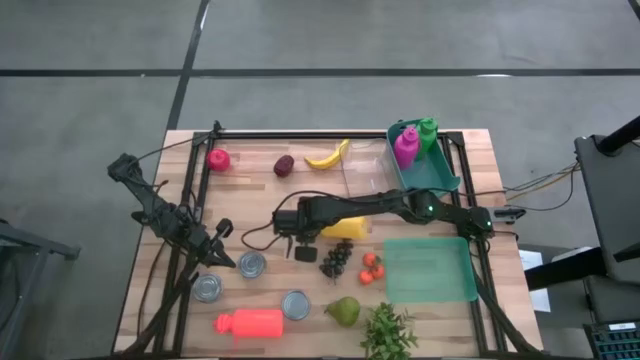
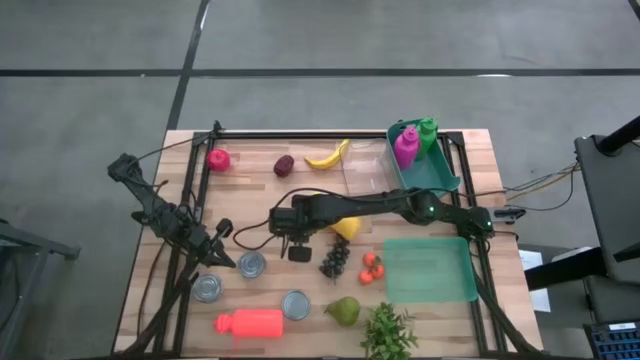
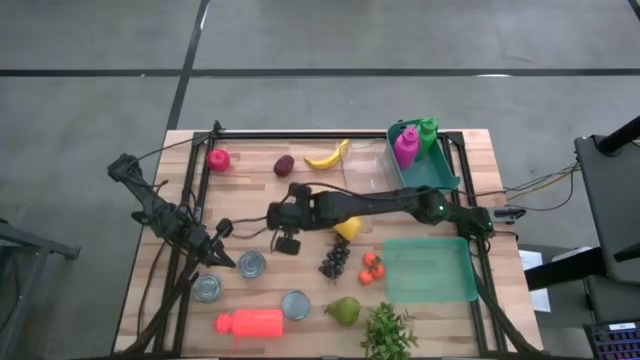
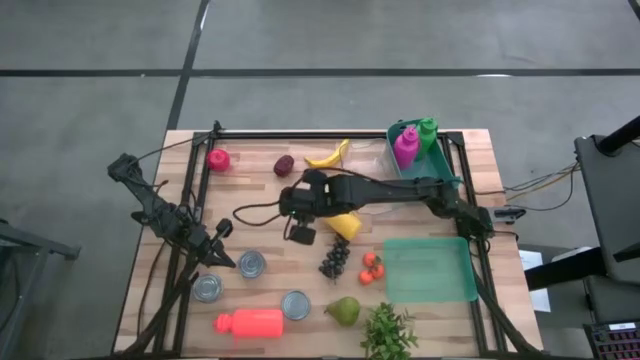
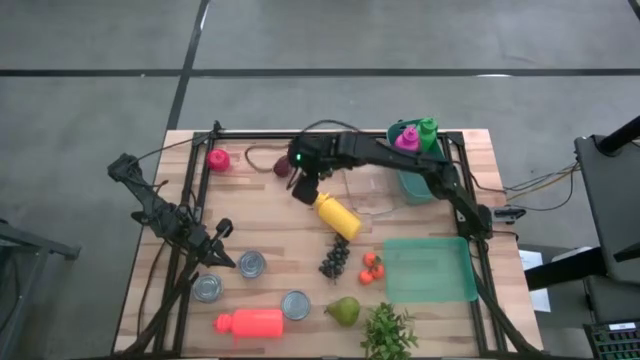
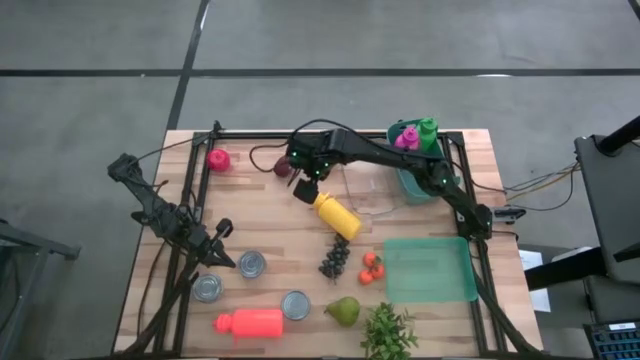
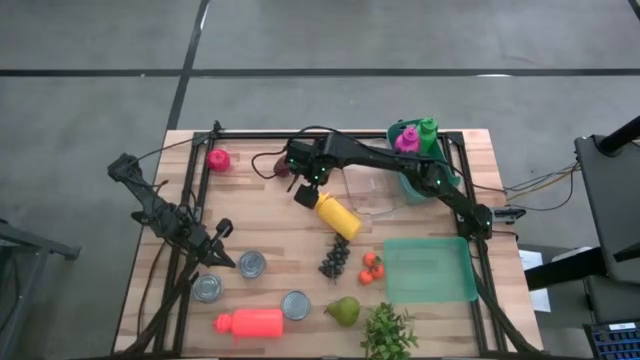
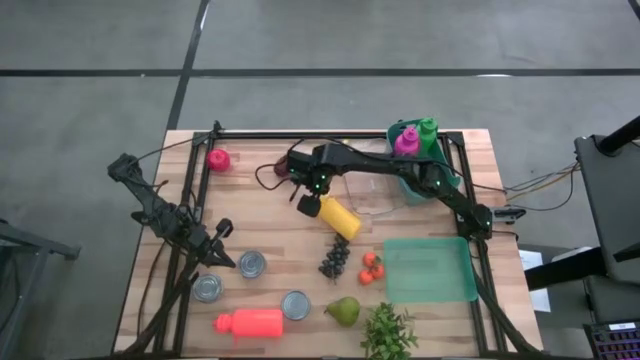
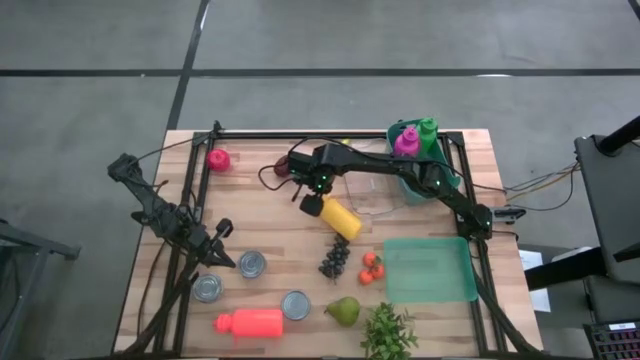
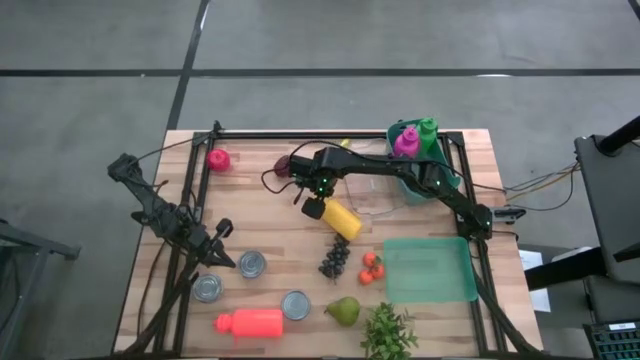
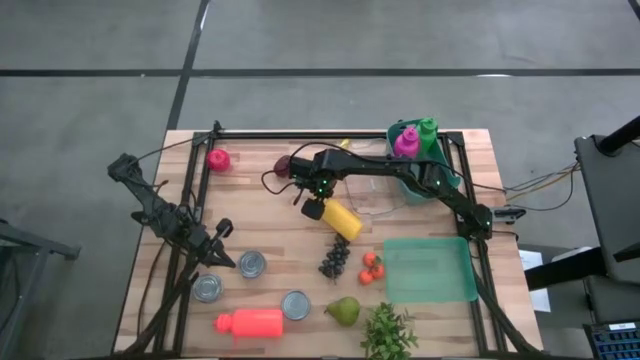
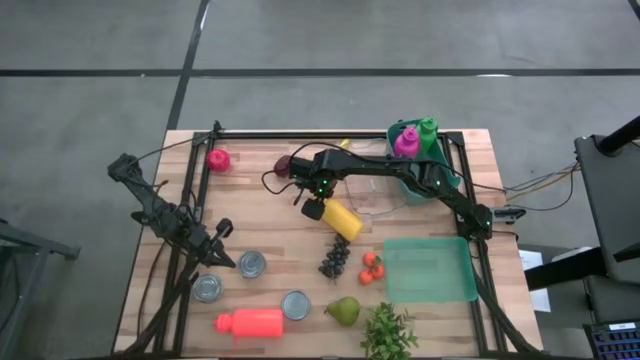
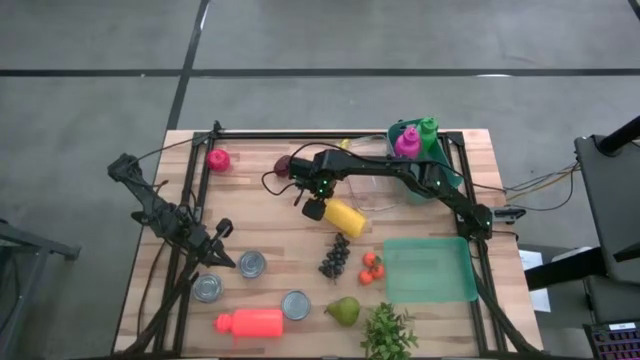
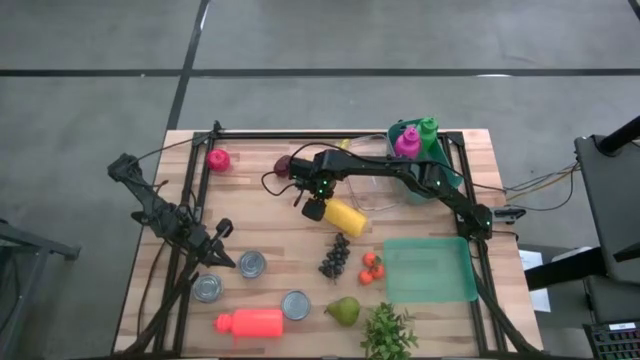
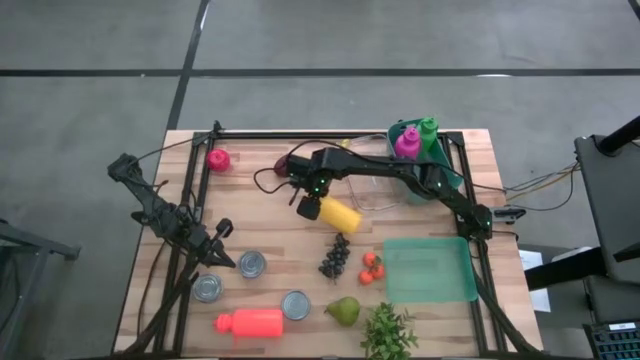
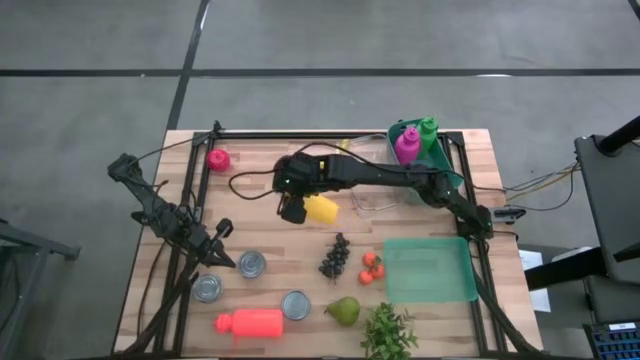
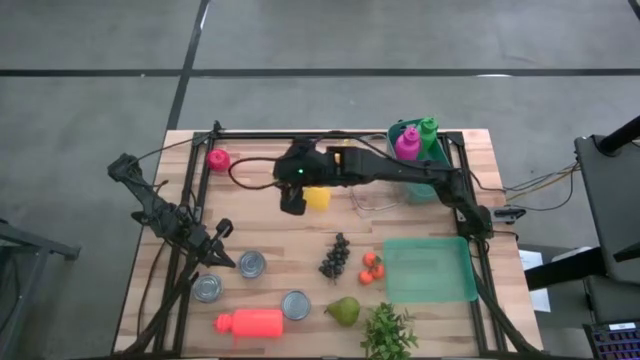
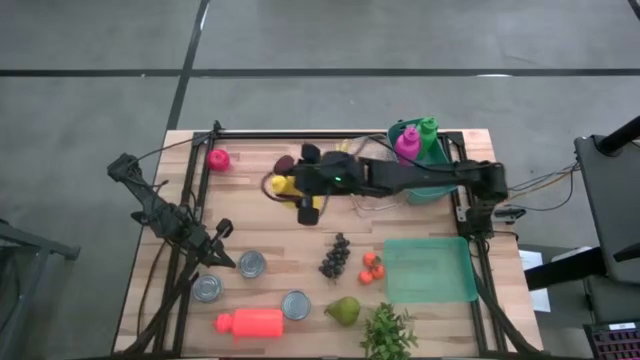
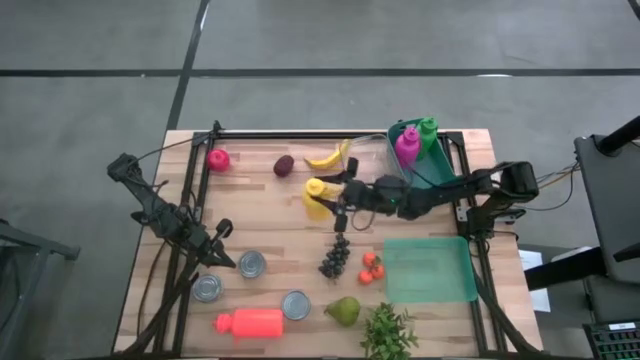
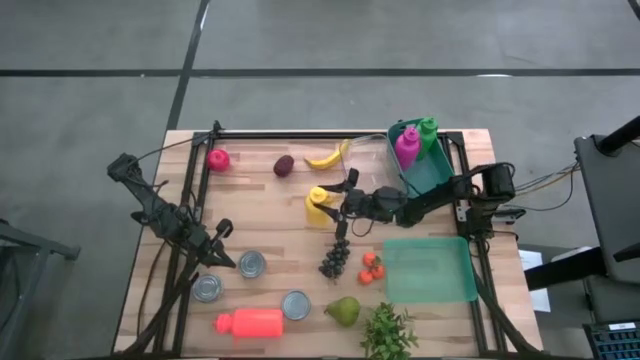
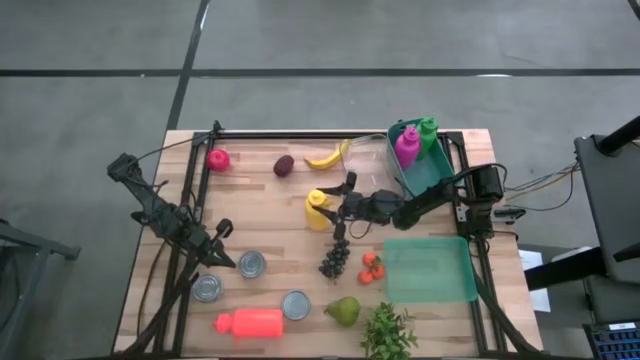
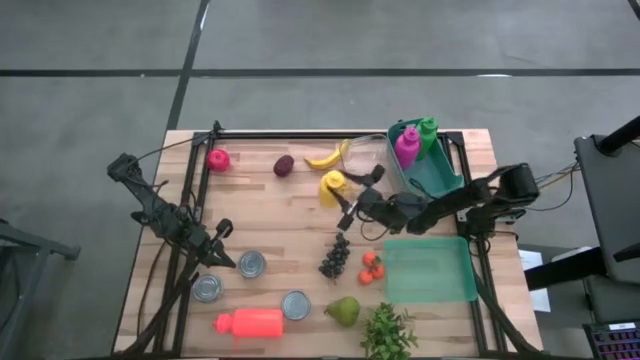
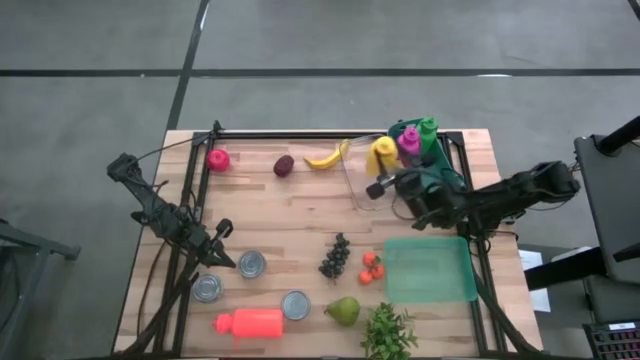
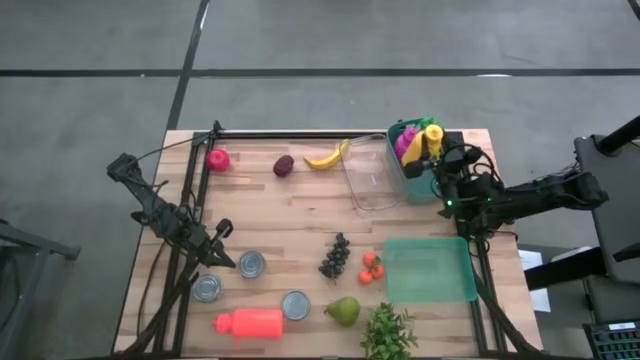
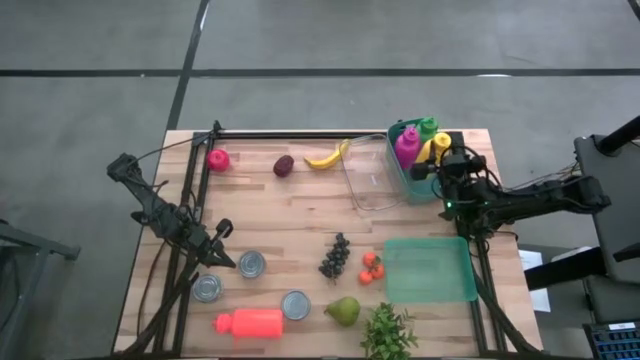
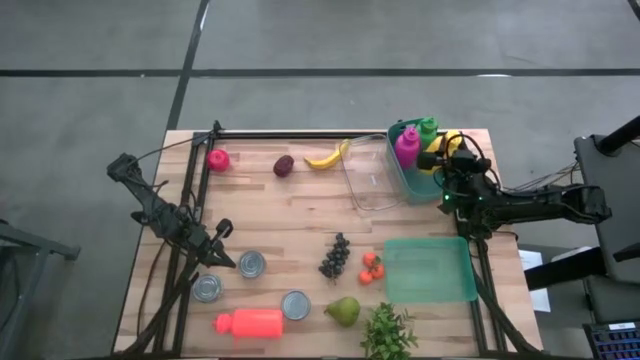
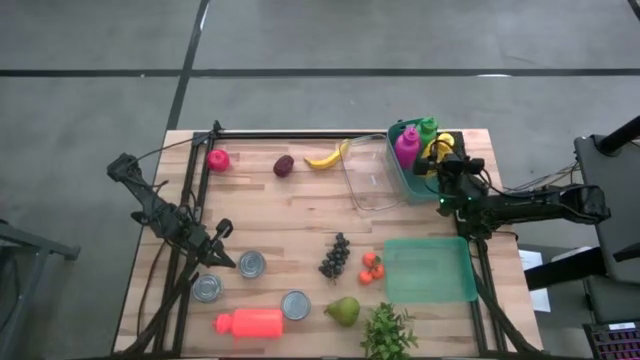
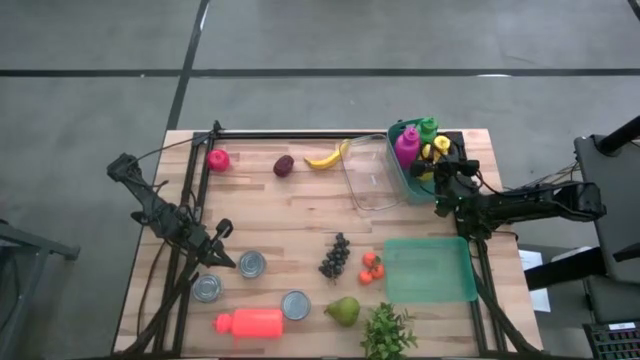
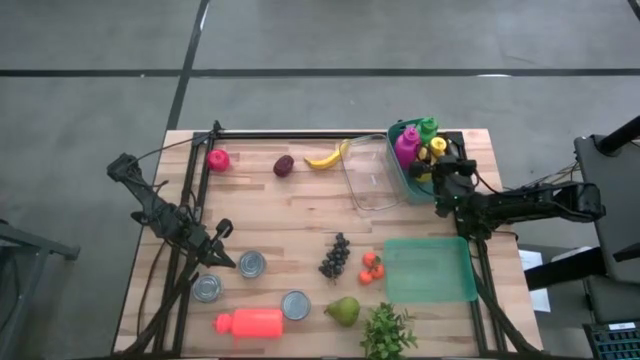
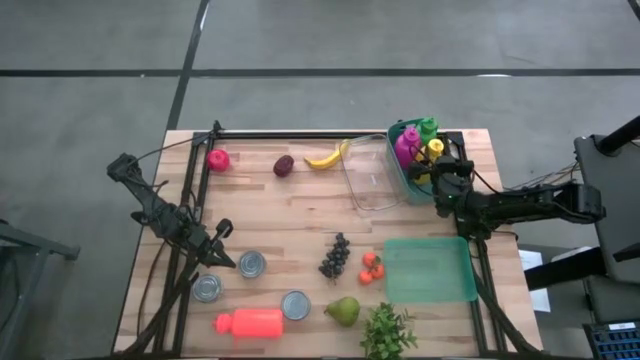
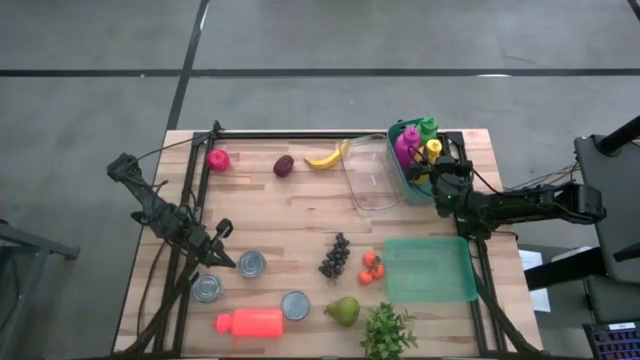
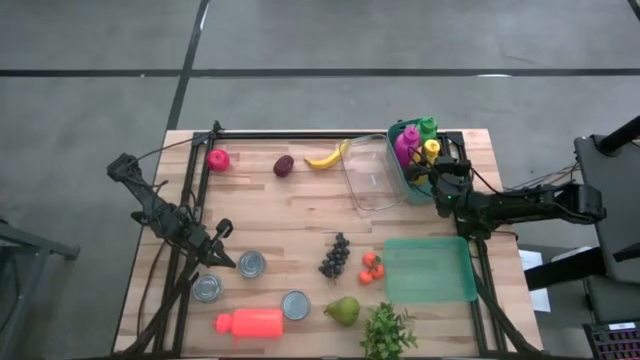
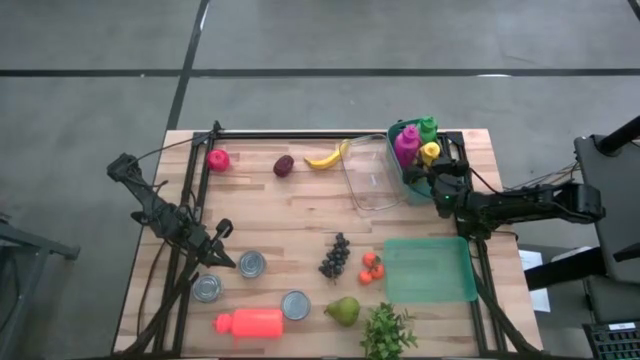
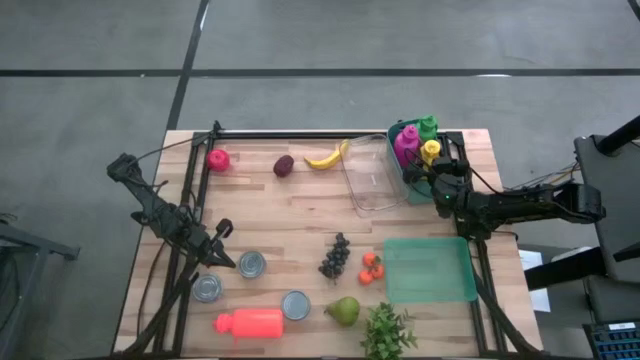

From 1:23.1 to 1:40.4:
Task: Pick & Place Food Item
Put the yellow water bottle into the green bin

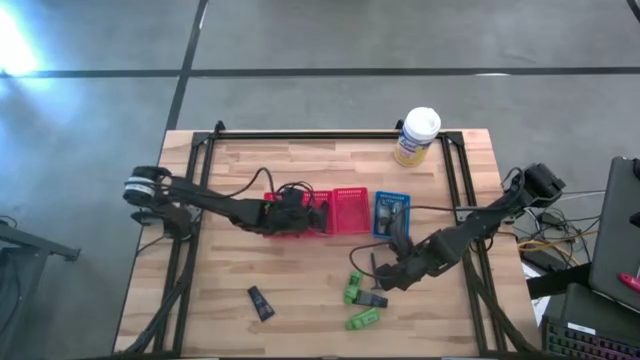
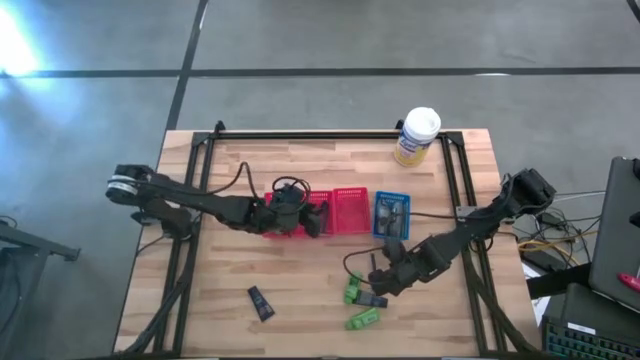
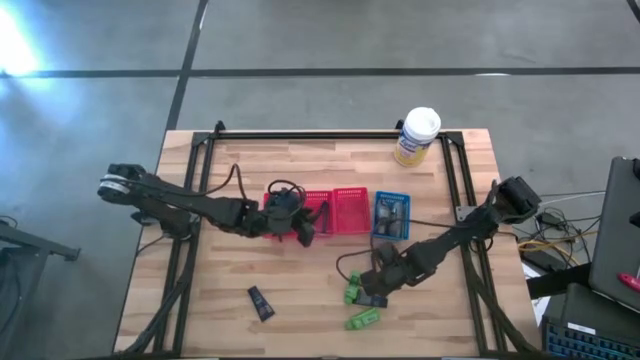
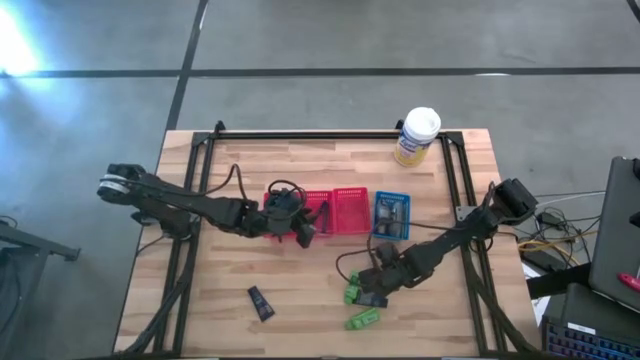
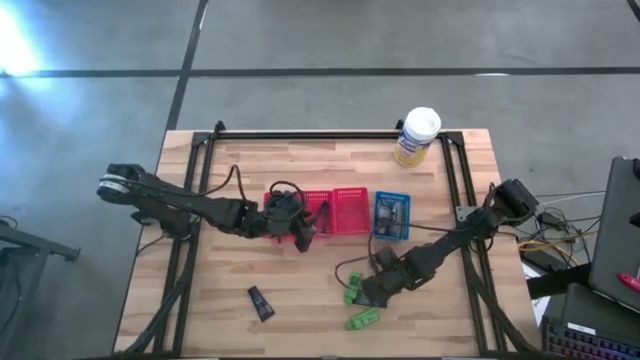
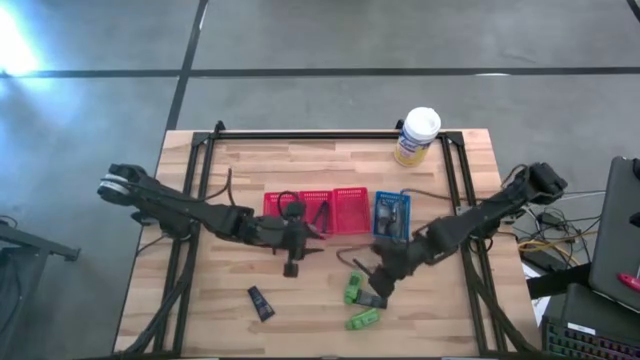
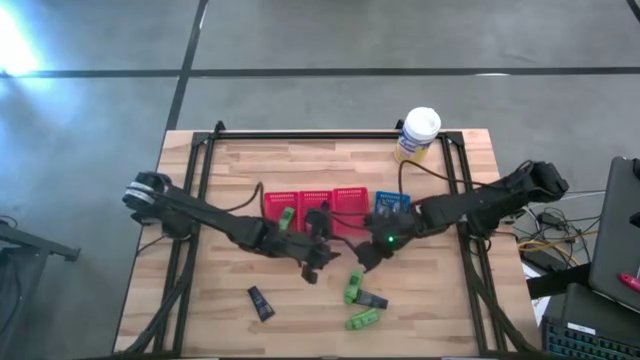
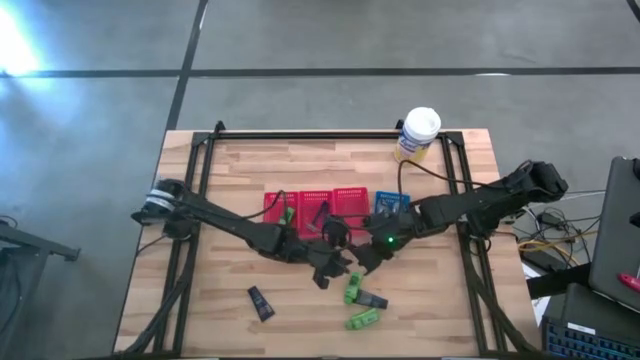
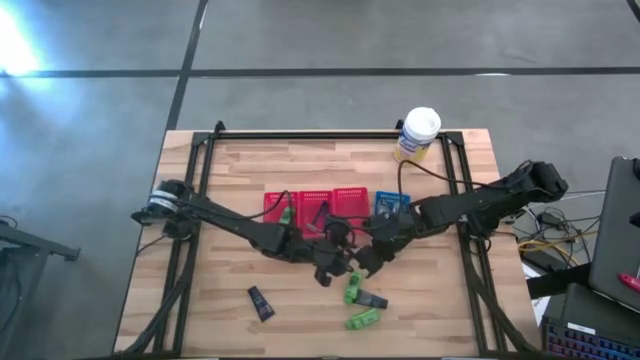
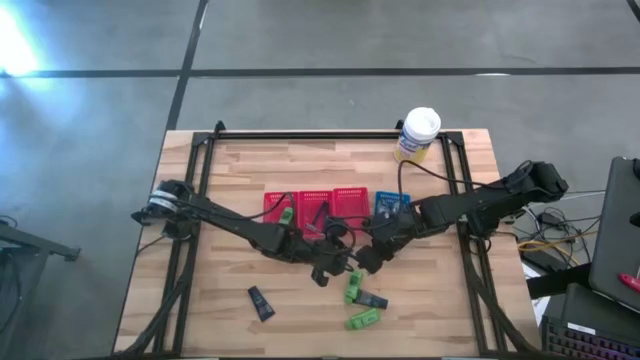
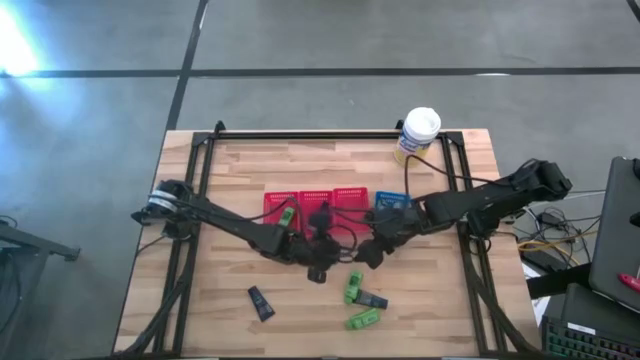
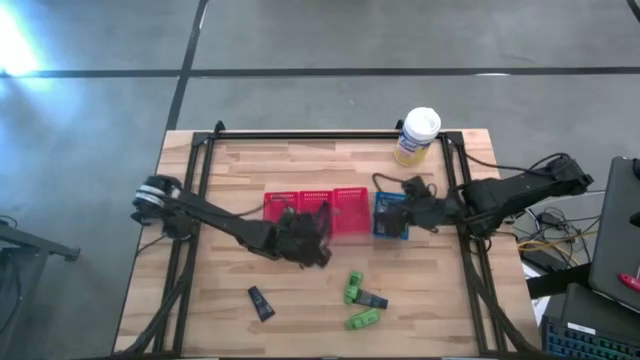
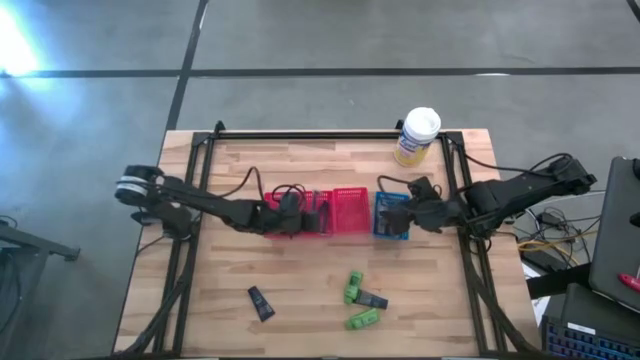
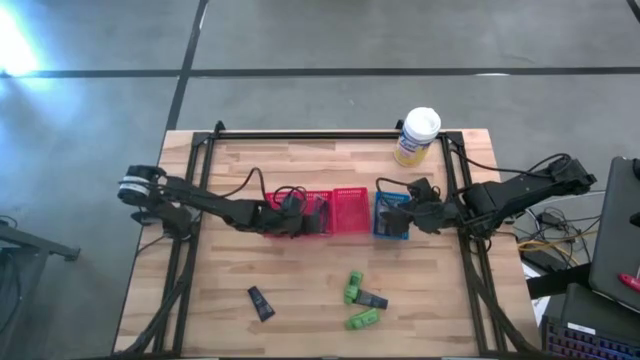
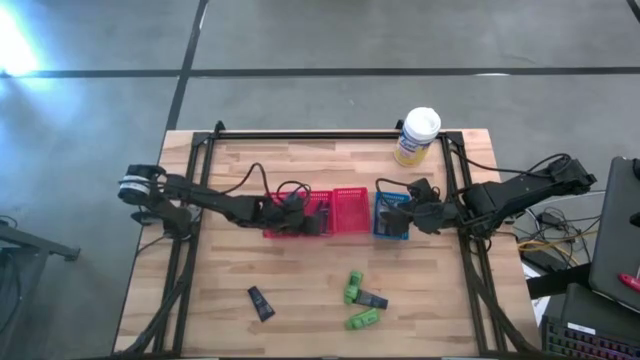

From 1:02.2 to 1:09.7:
Task: Pick & Place Travel size toiletries
Put the blue razor into the middle red bin
